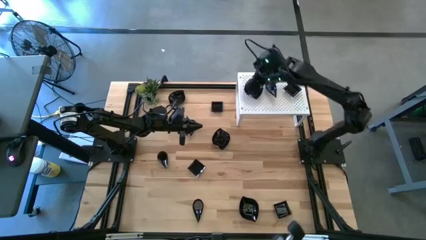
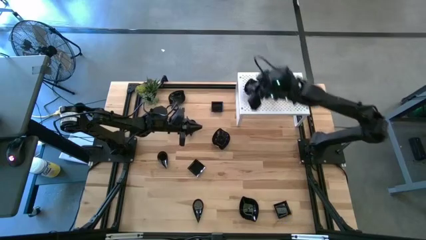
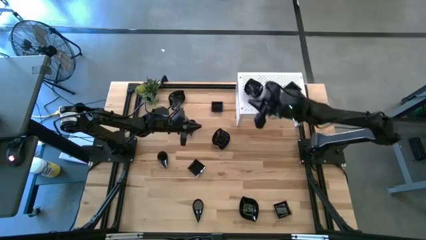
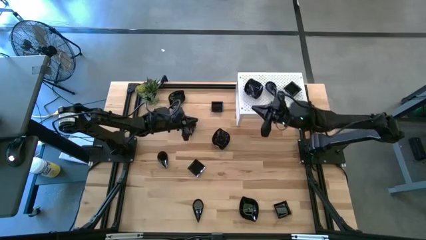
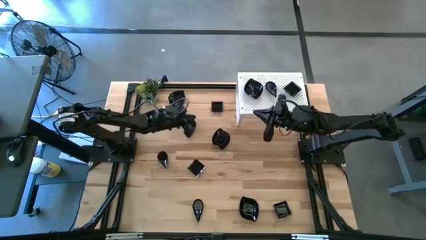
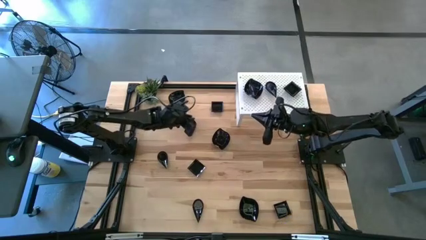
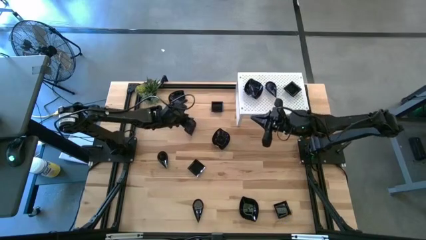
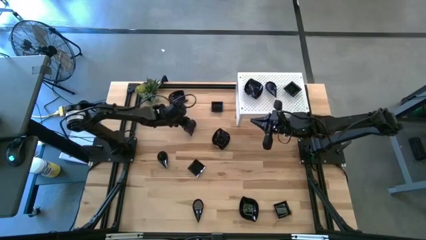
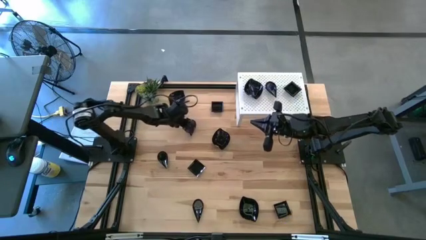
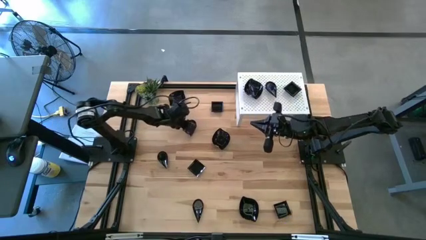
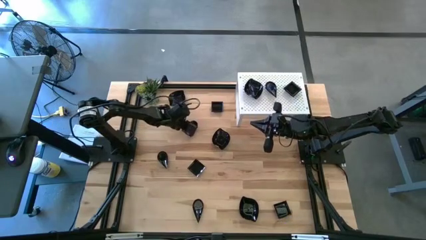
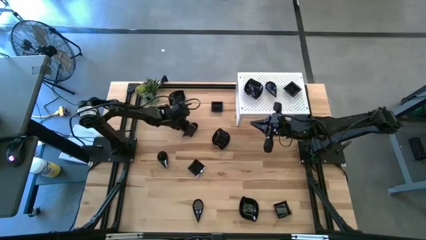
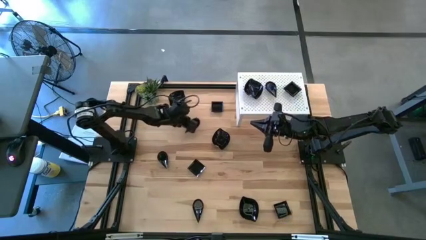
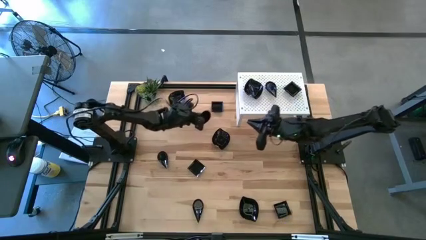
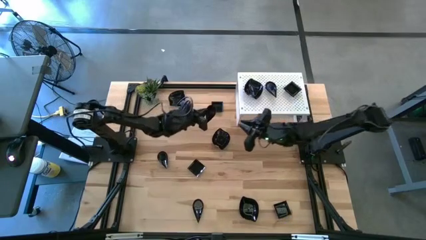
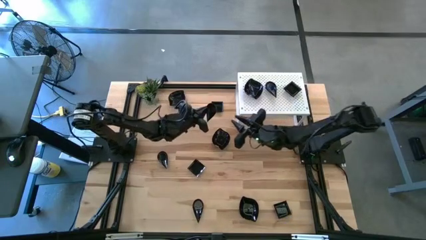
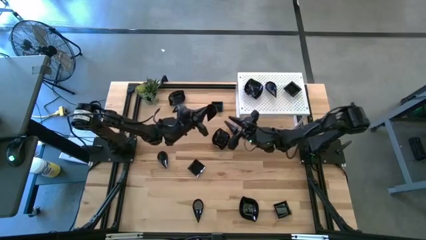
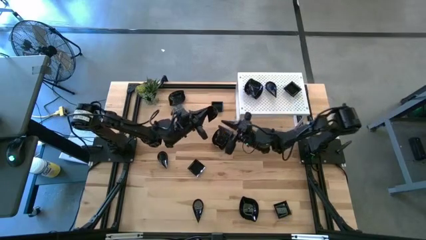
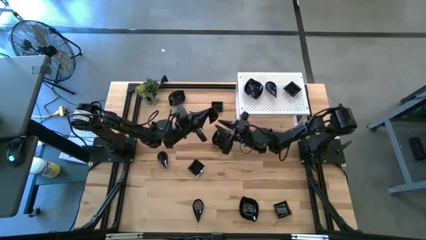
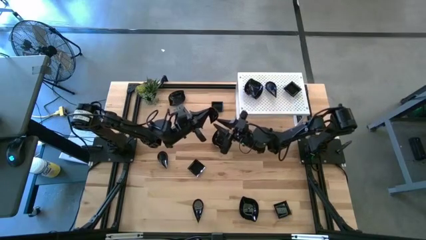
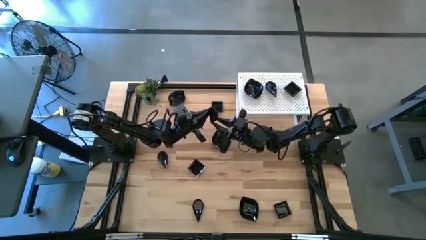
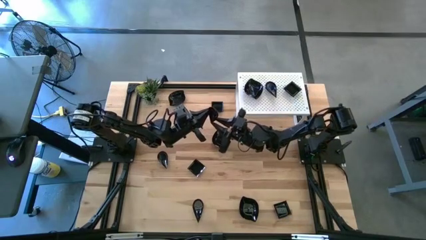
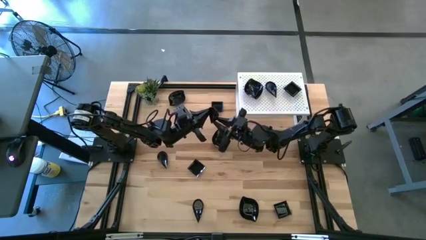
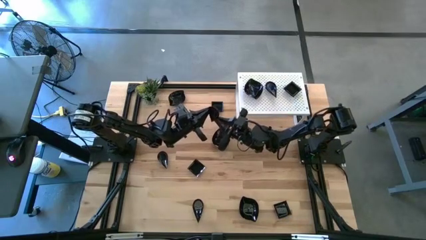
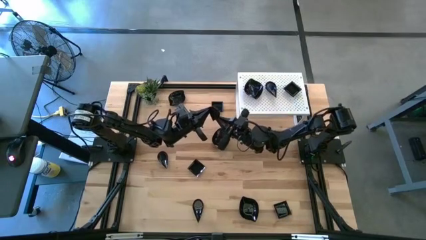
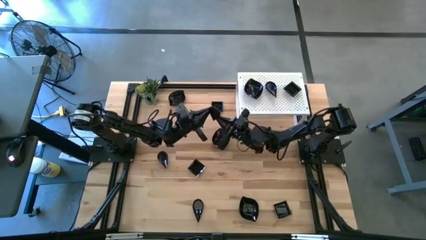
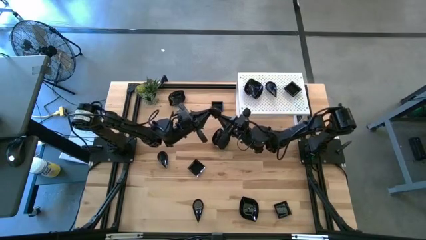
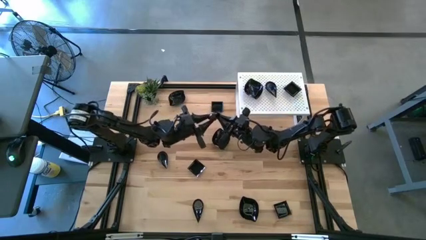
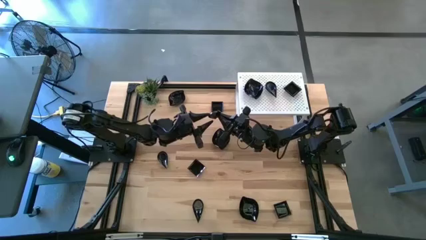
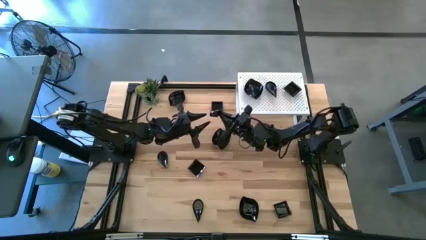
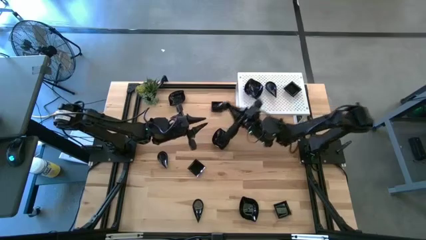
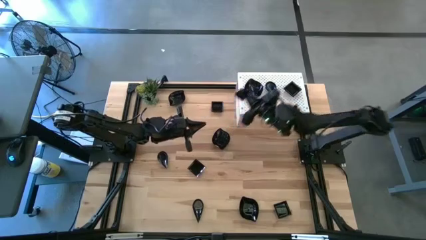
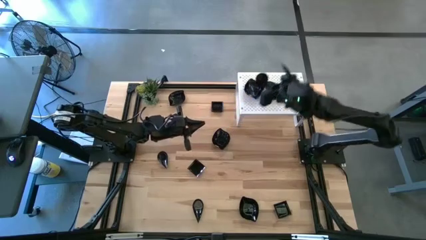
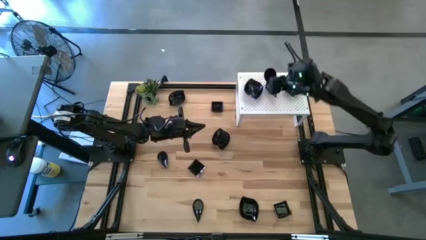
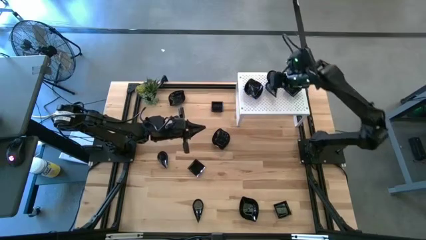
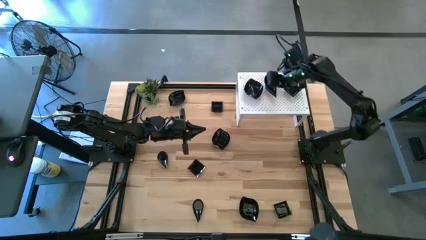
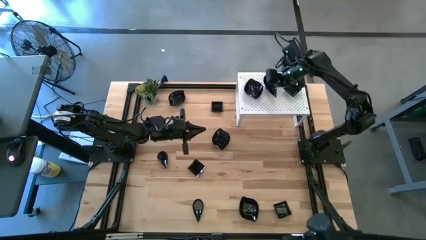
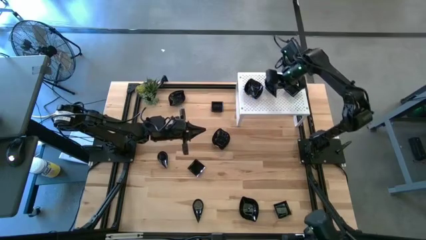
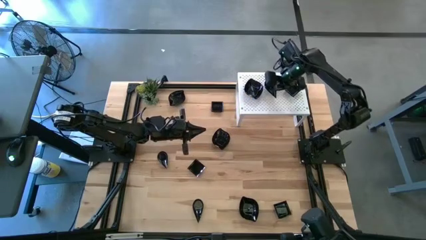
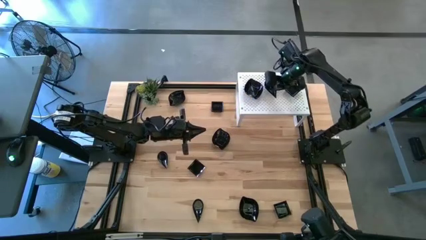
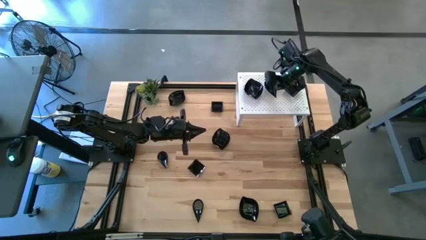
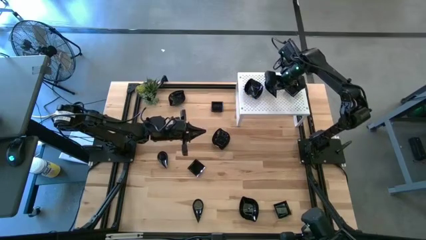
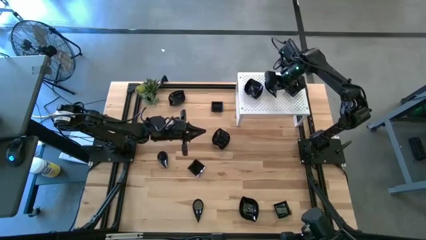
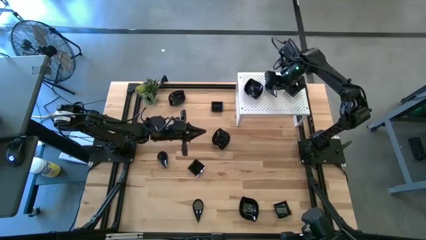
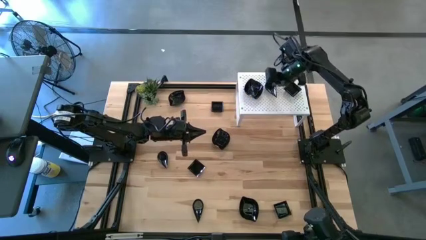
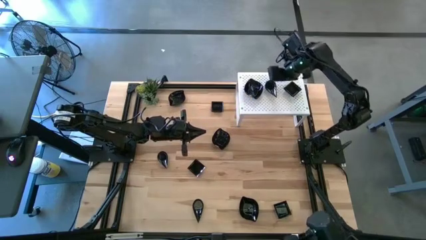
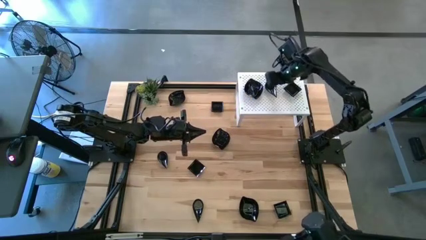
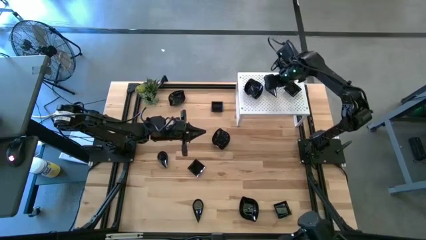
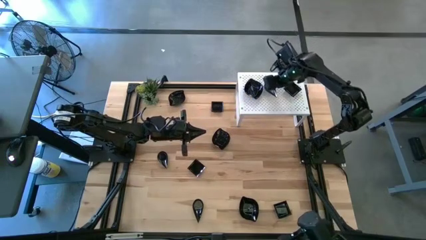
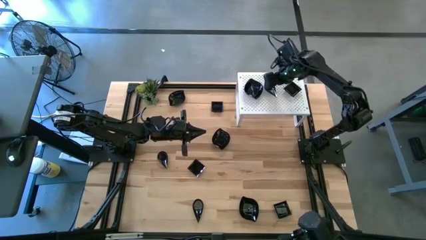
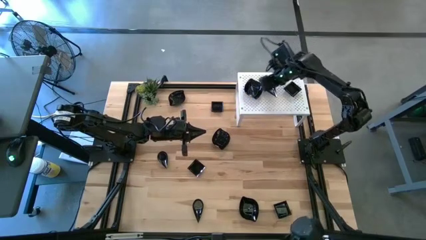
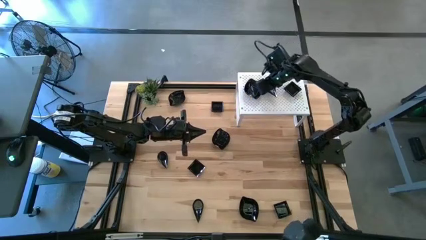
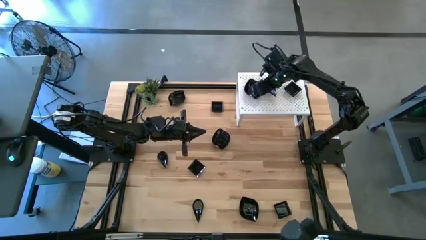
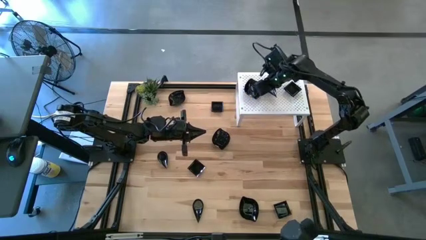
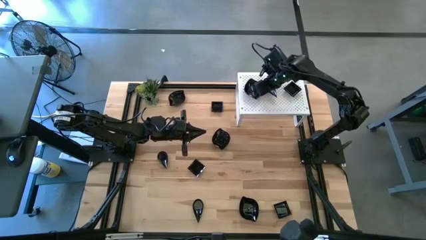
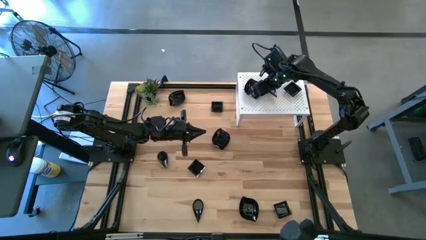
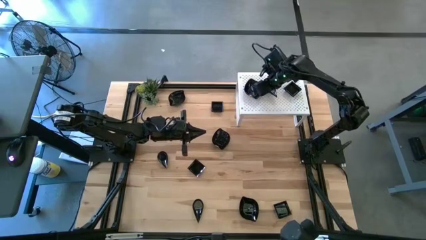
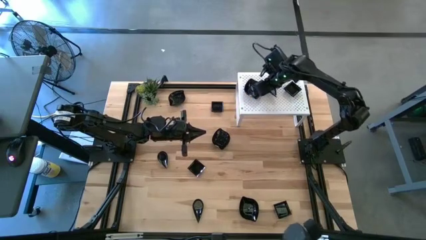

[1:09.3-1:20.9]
Task: Pick & Place Mini shaped plates
Stack the black drop-shaped plate on top of the black drop-shaped plates on the shelf

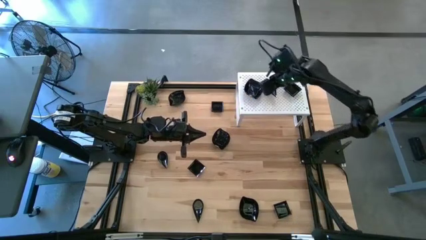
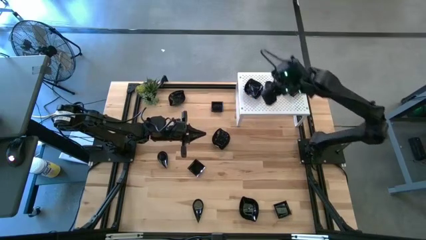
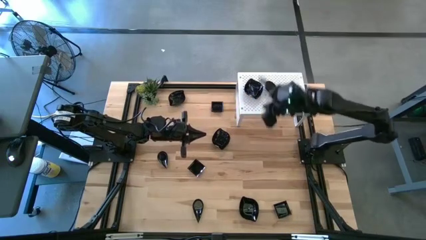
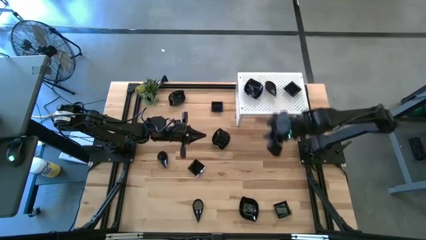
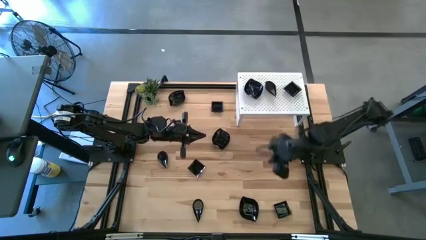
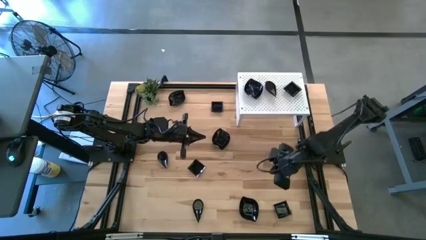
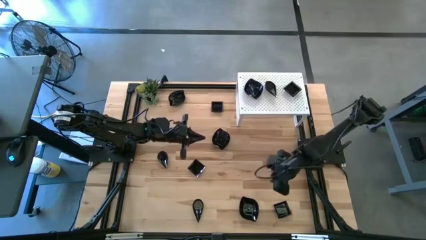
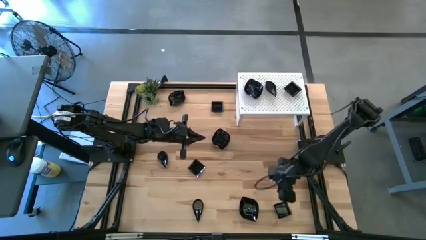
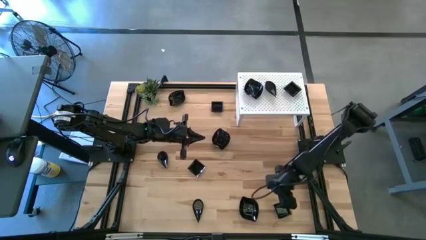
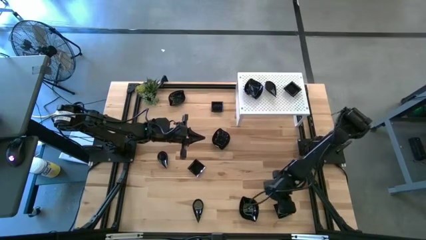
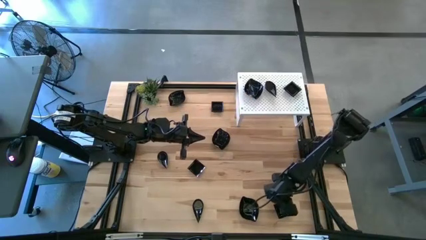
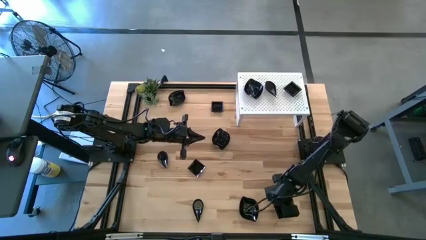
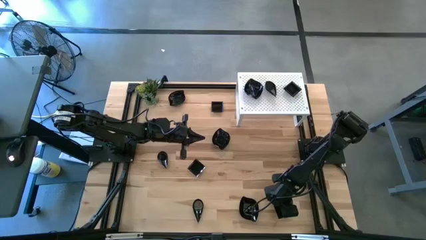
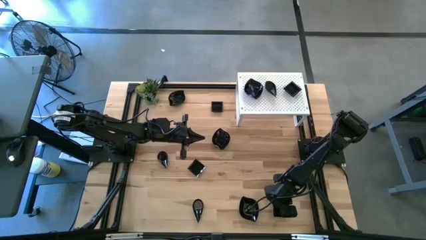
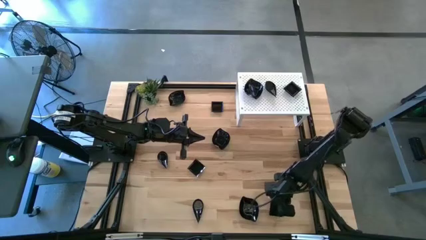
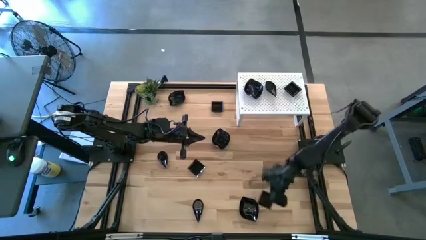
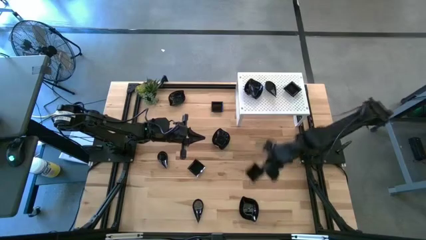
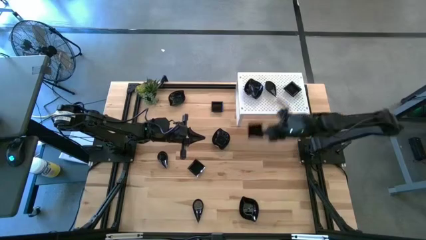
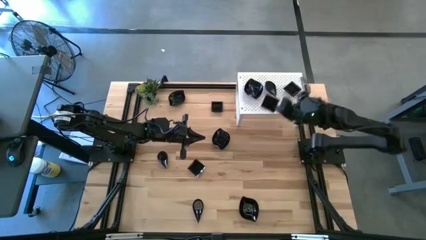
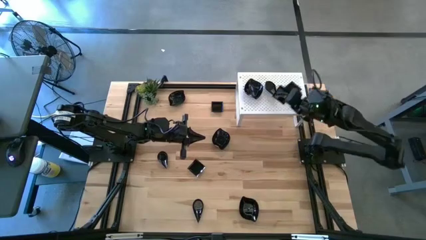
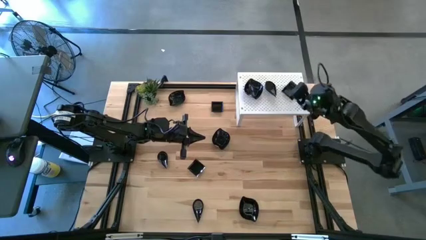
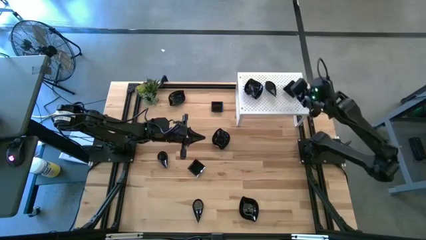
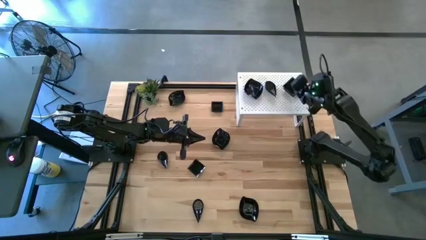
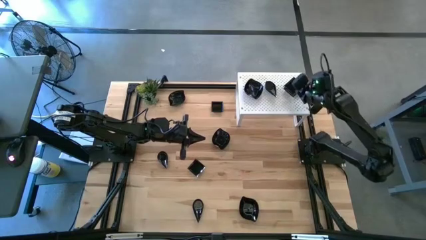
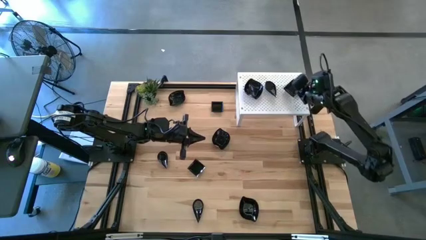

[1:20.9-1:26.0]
Stack the black square plate on top of the black square plates on the shelf
